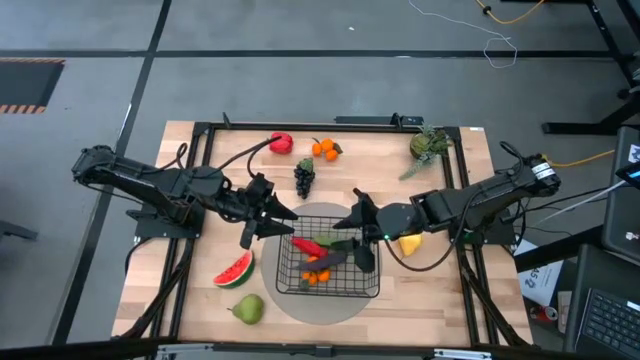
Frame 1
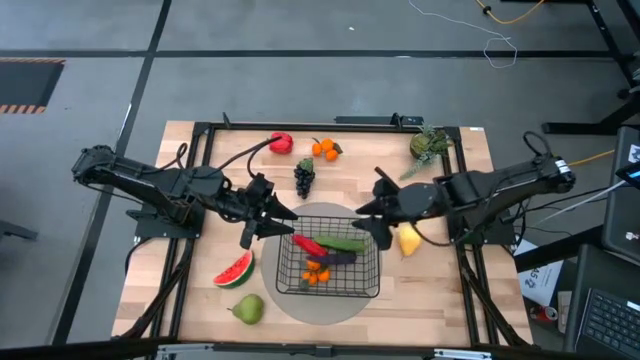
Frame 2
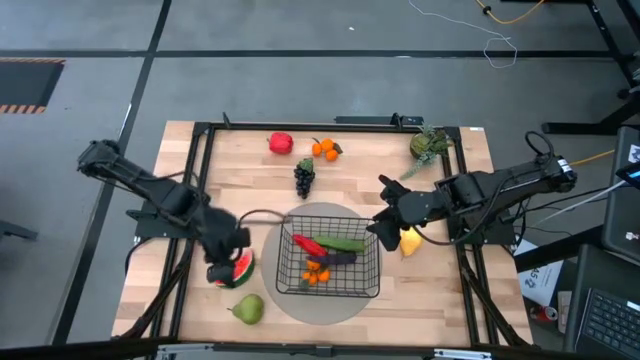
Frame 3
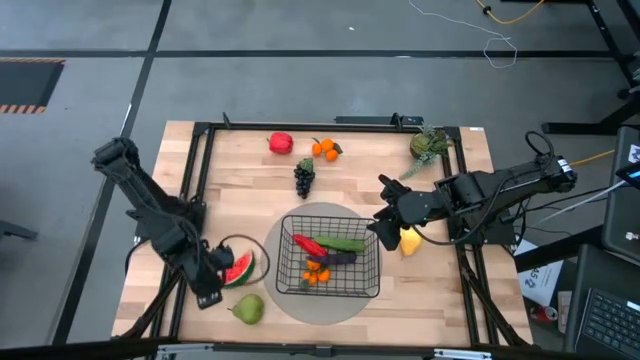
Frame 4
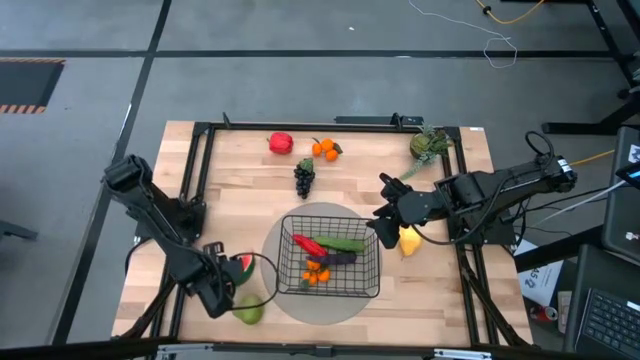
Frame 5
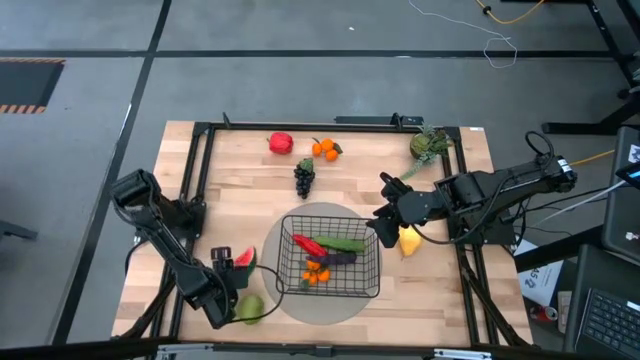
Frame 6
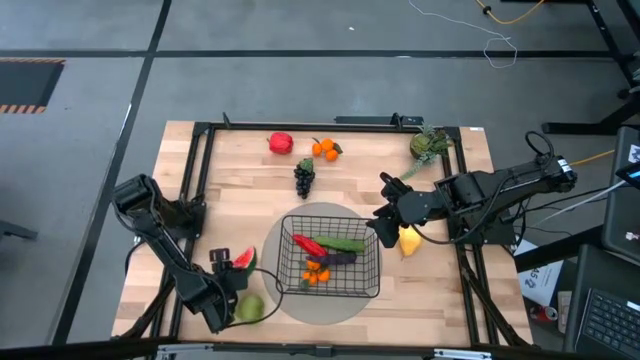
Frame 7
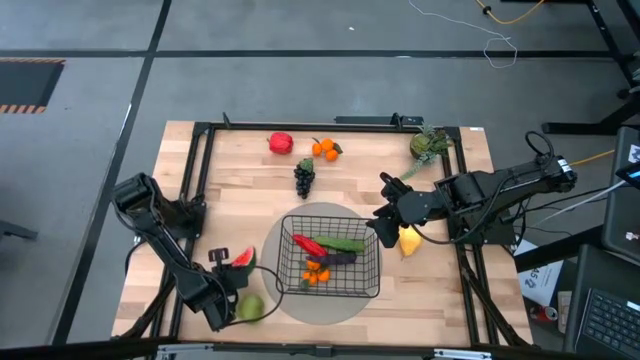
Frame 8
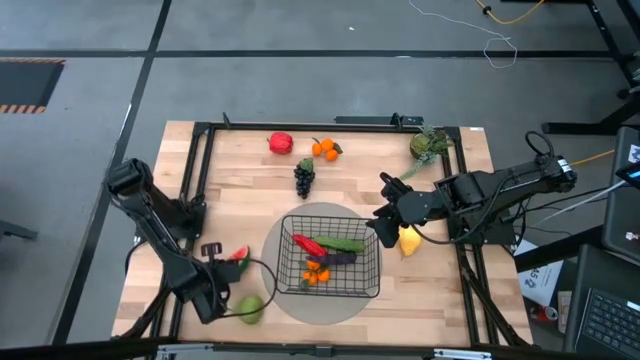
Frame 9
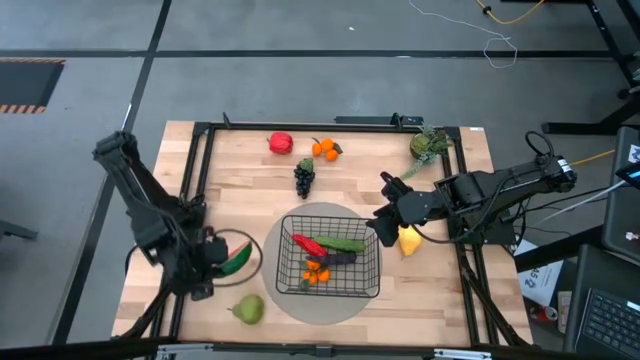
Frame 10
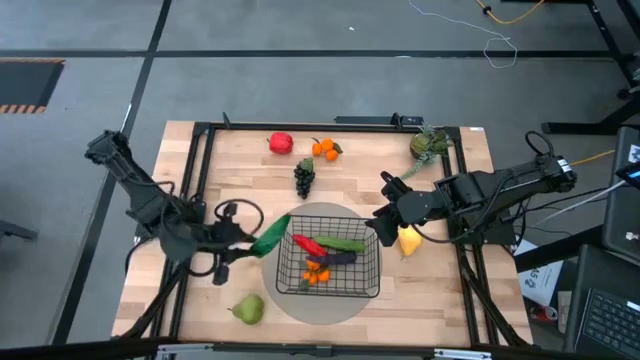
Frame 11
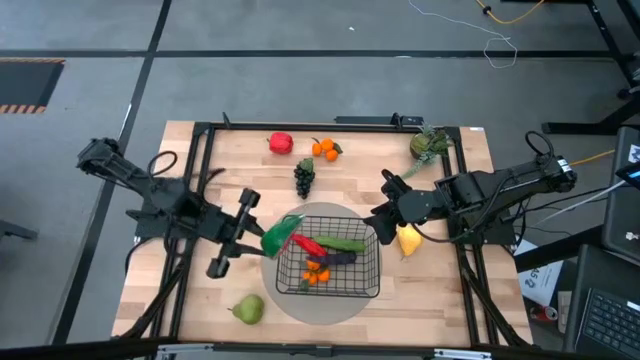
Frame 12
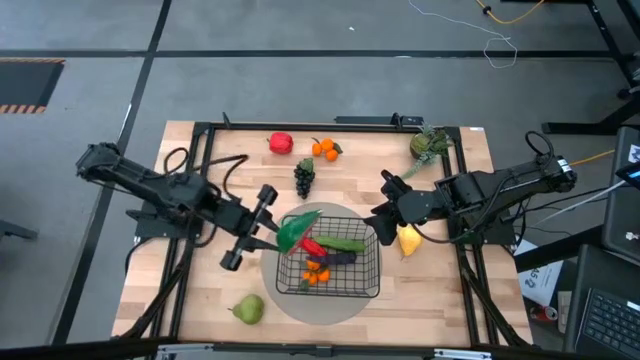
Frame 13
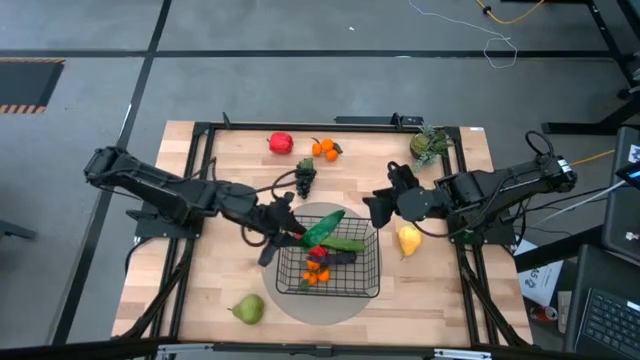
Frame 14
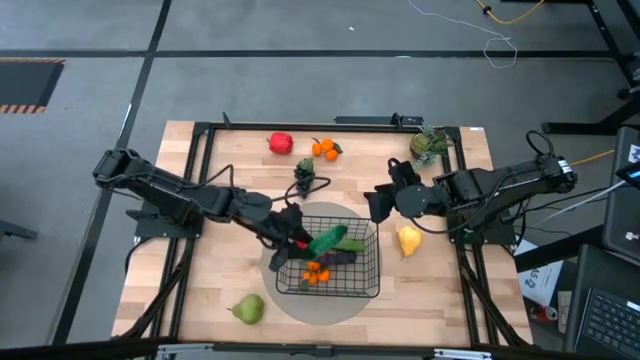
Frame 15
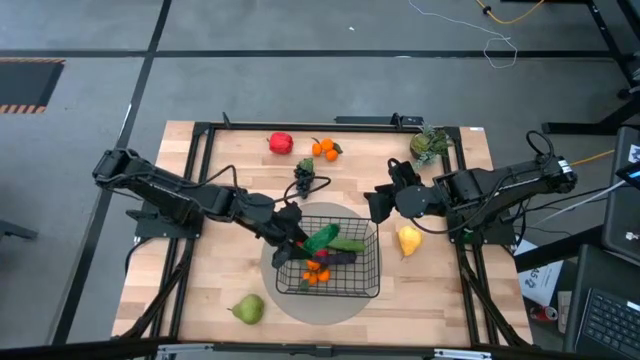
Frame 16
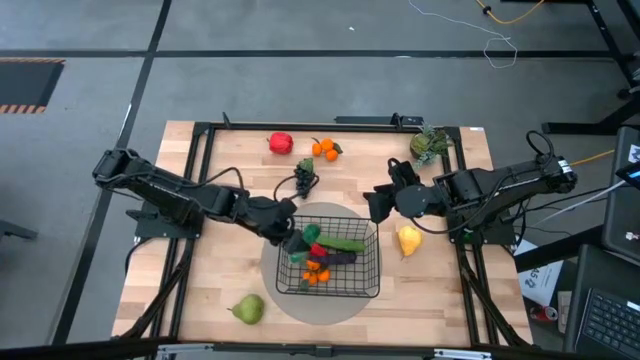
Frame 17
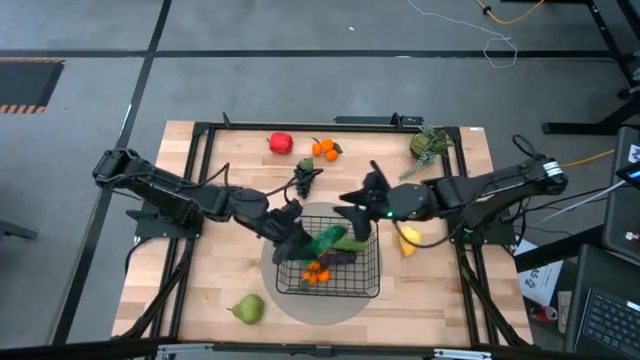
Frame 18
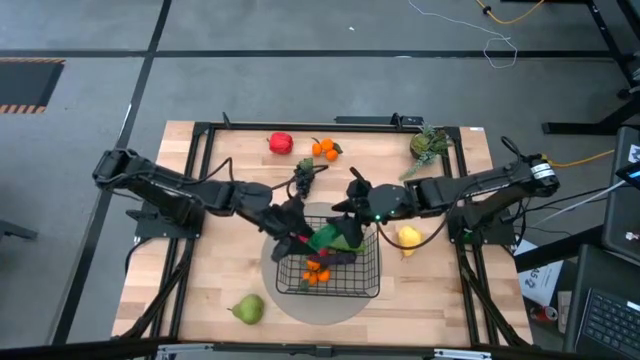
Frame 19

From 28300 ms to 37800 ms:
Task: Build produce basket
Put the red watermelon into the black wire basket

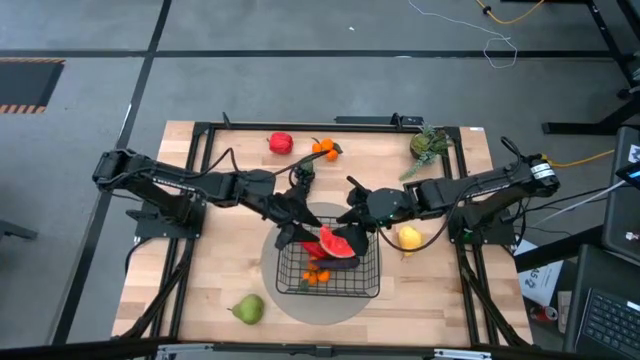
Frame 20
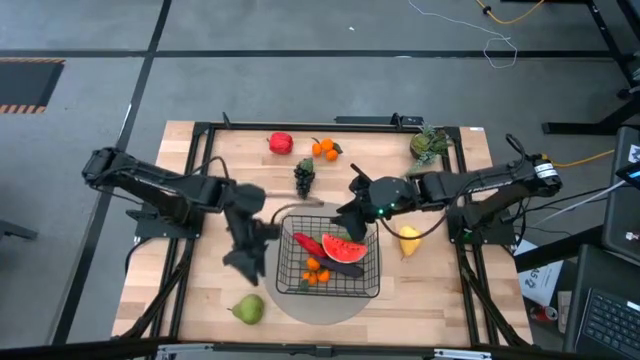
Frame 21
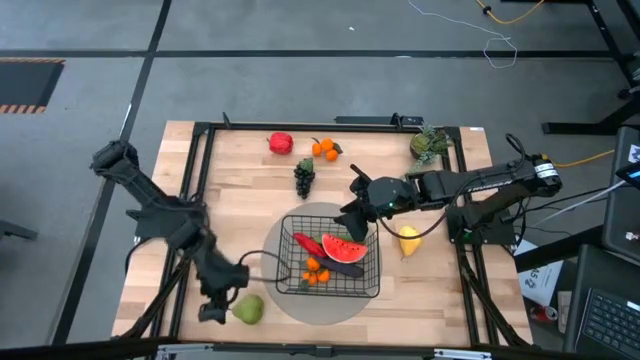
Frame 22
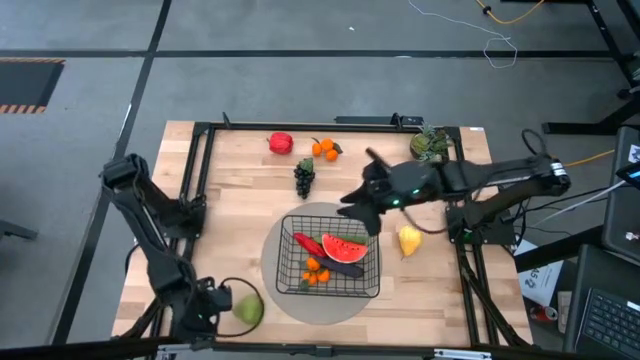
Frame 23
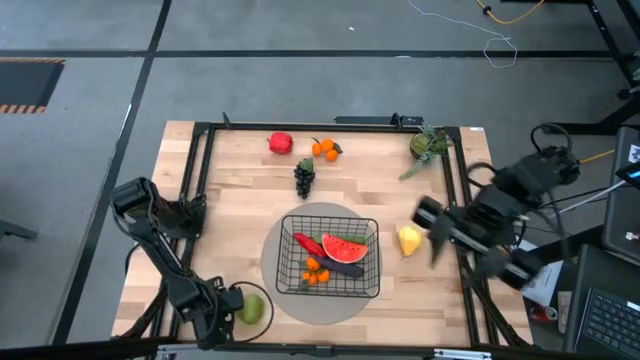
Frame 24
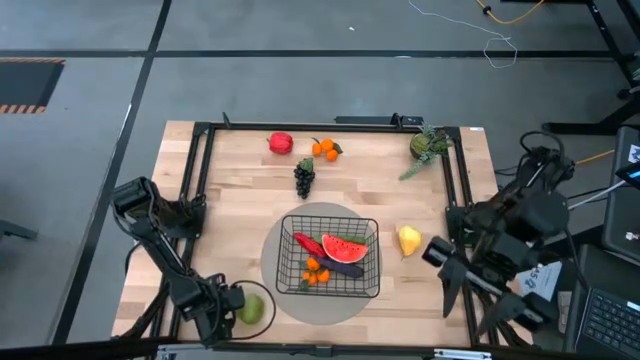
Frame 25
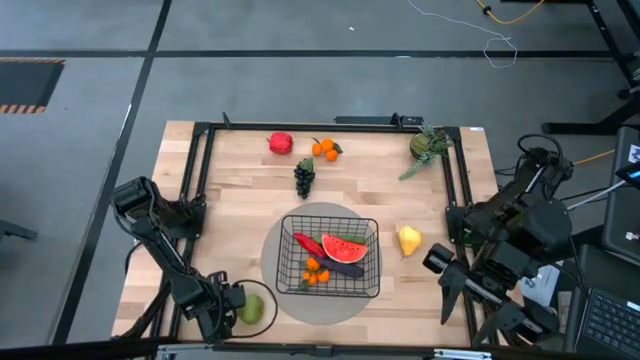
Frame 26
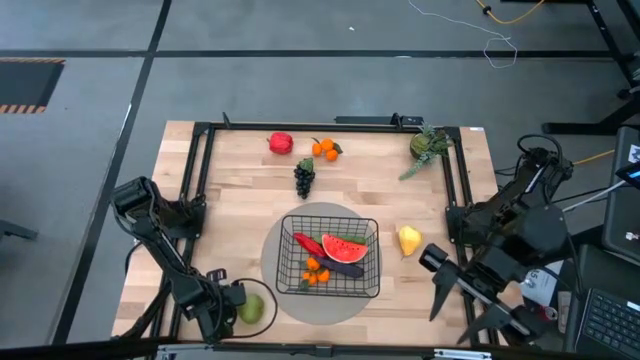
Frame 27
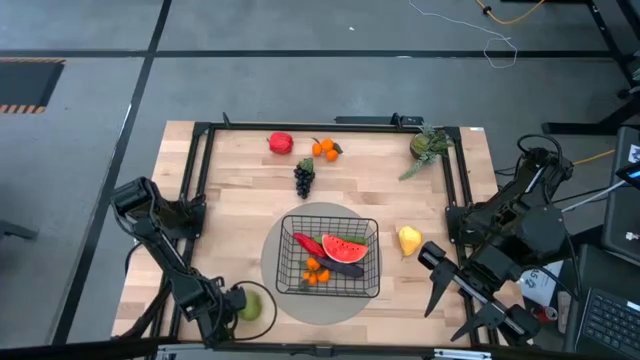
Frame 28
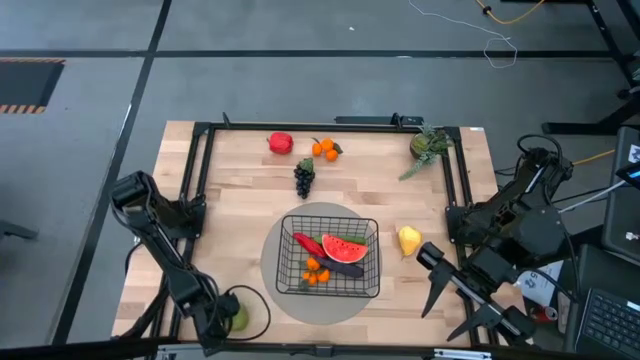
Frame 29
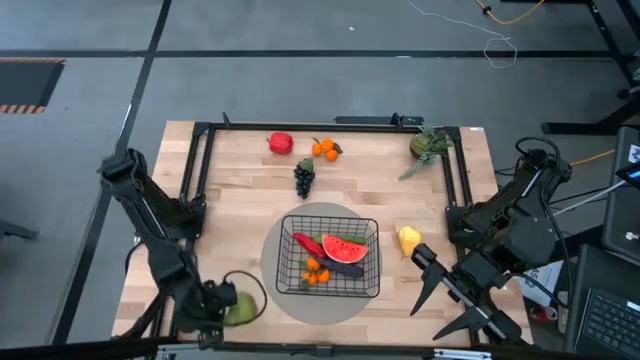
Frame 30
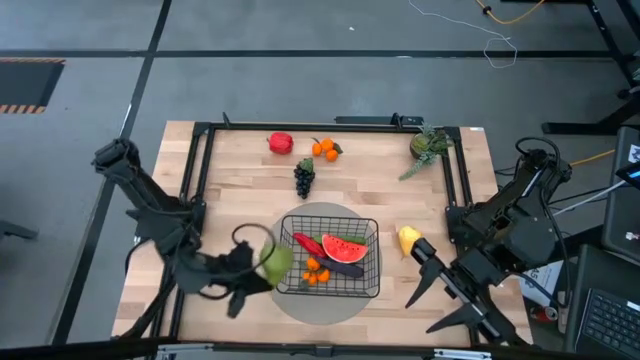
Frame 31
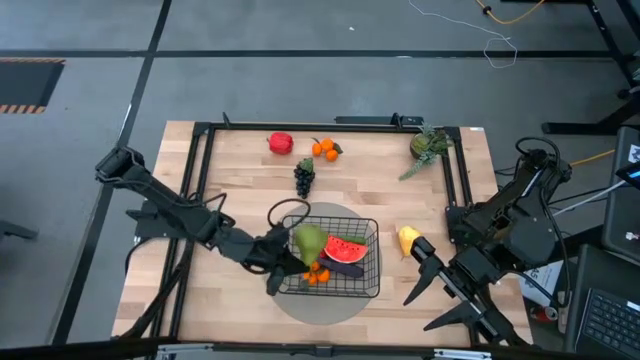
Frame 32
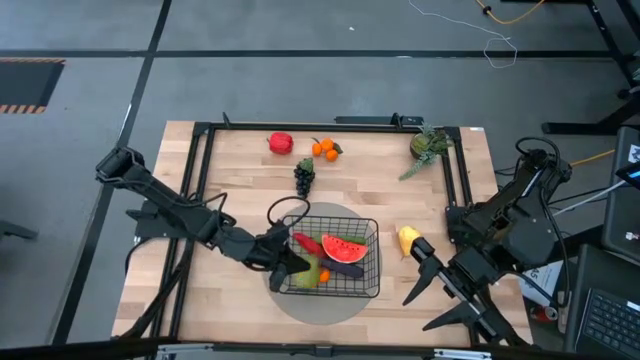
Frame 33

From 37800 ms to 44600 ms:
Put the green pear into the black wire basket

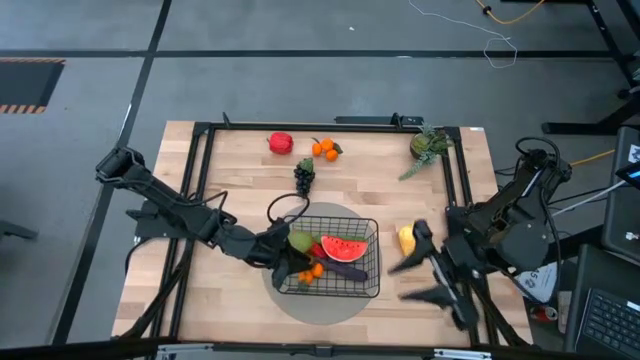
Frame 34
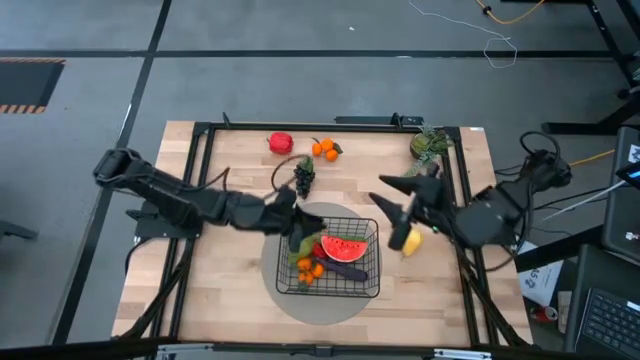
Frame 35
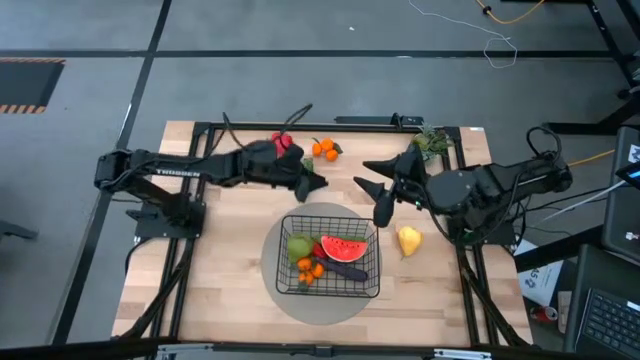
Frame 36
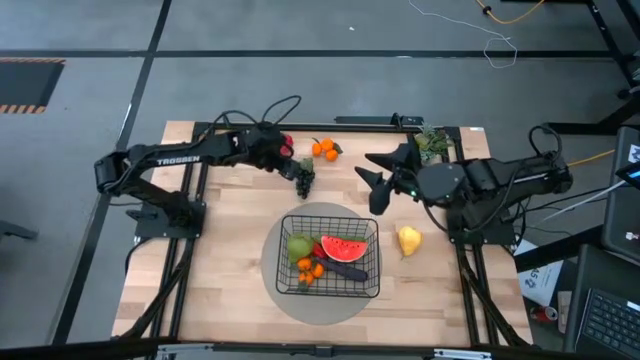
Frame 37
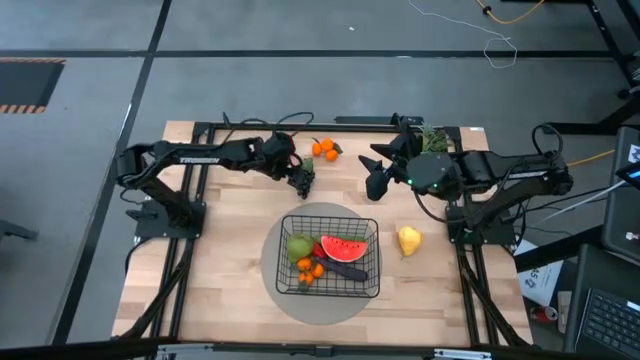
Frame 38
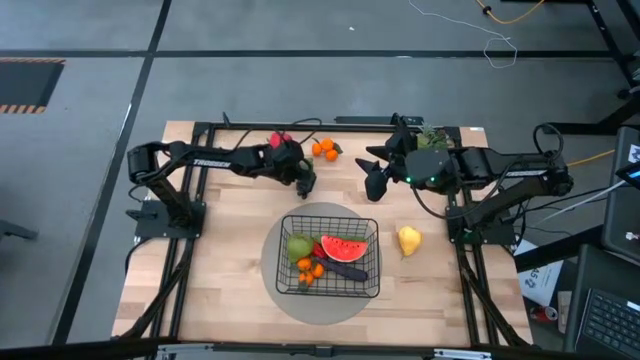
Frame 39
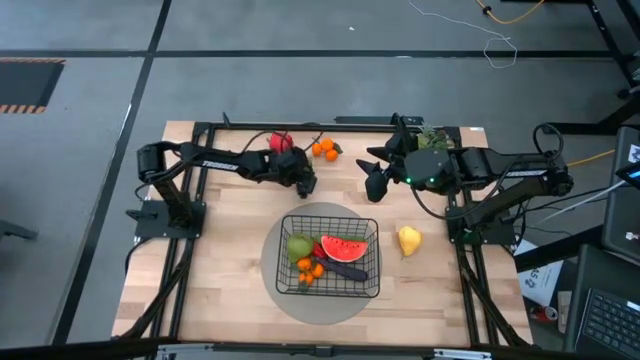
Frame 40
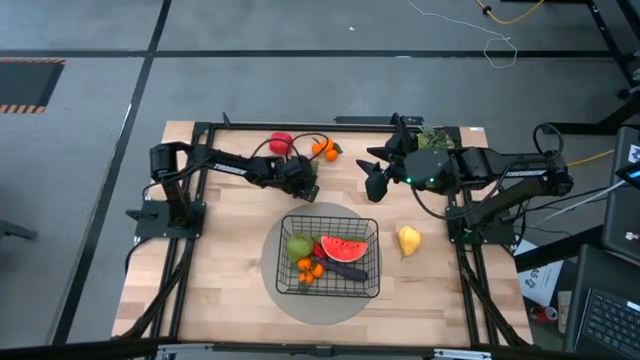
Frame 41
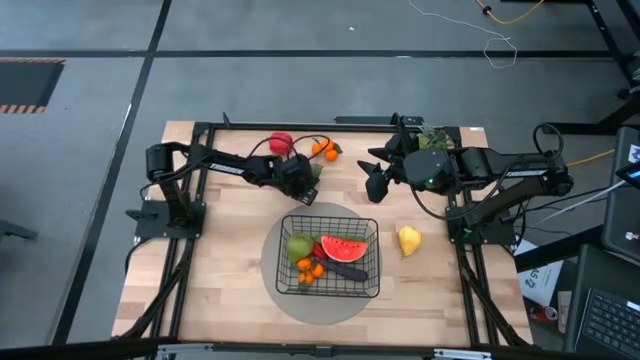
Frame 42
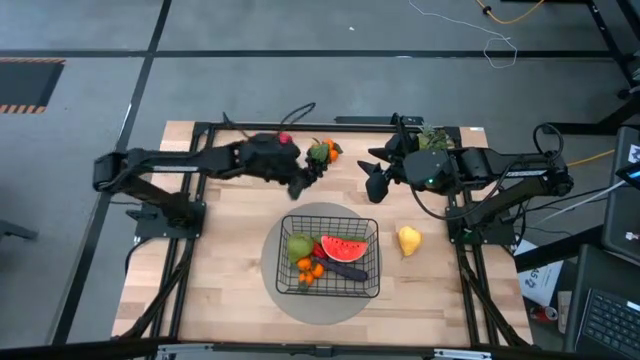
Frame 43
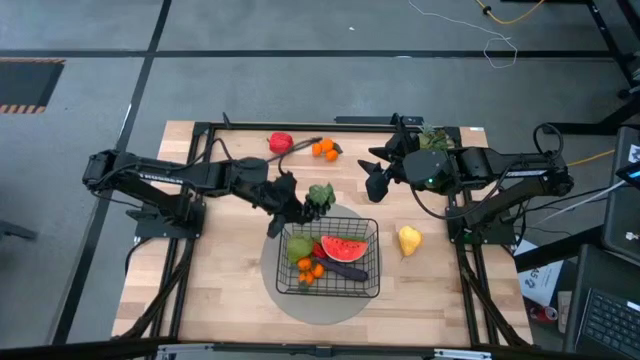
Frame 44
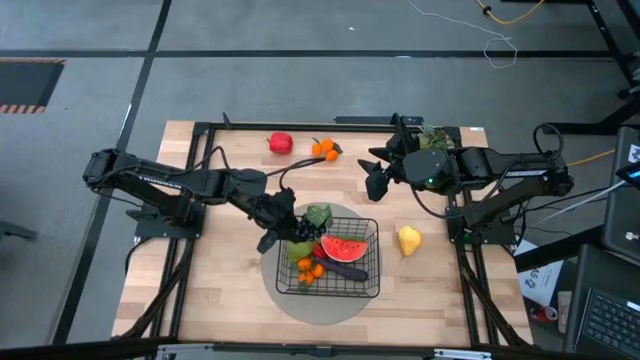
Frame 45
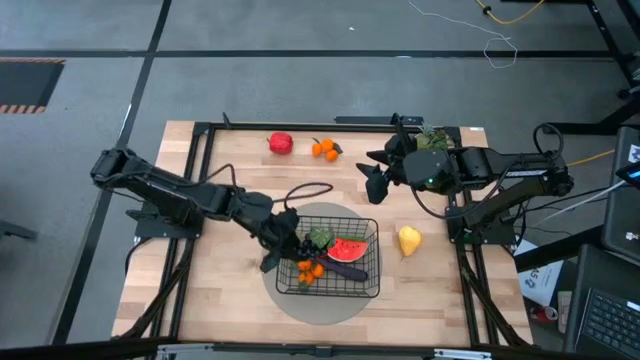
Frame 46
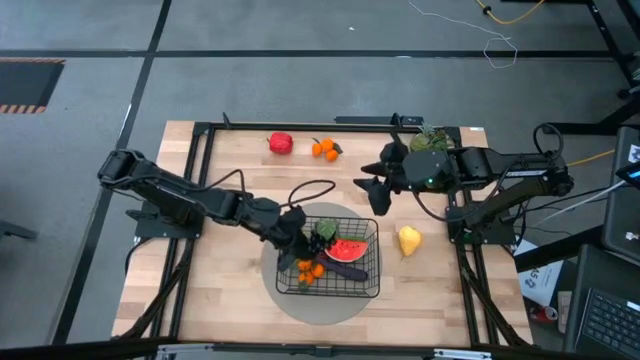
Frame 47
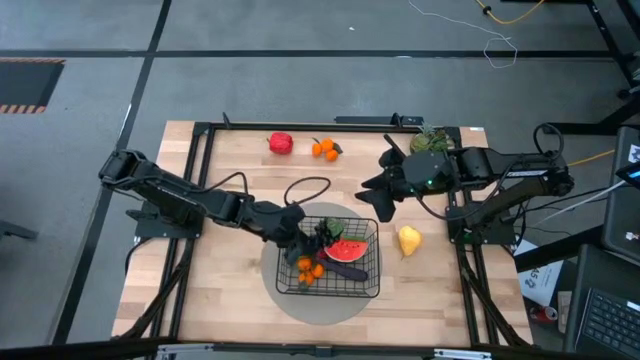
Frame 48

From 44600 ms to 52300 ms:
Put the black grapes into the black wire basket
